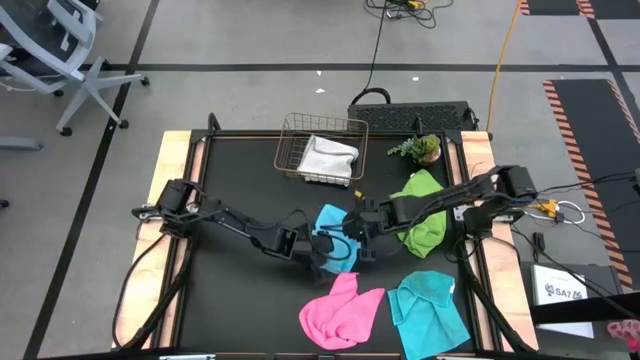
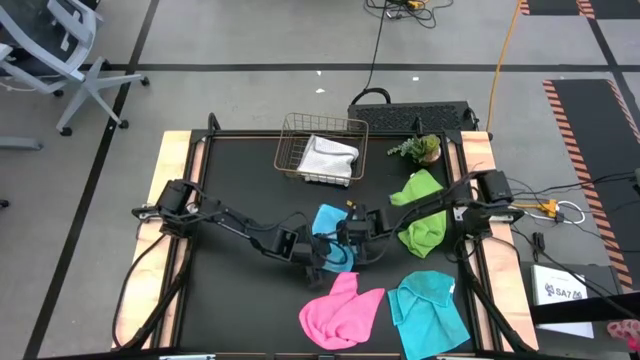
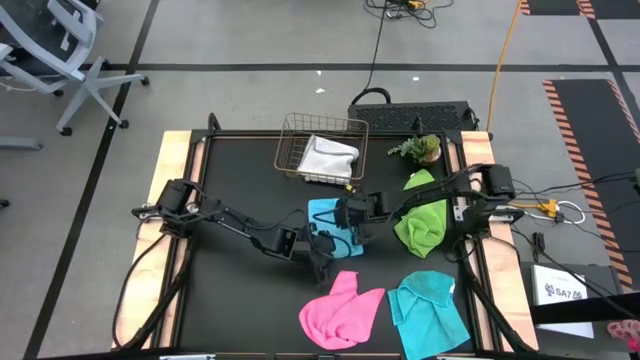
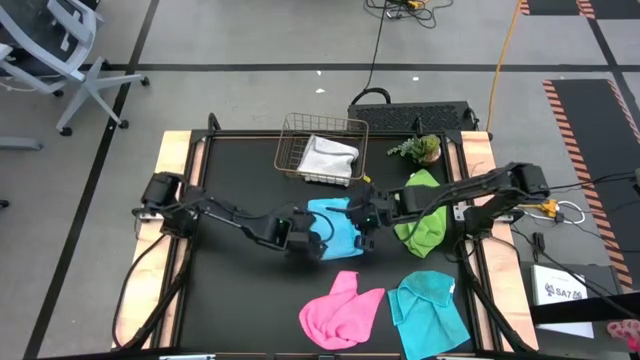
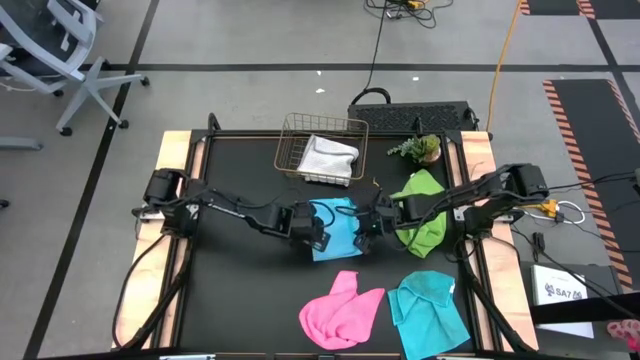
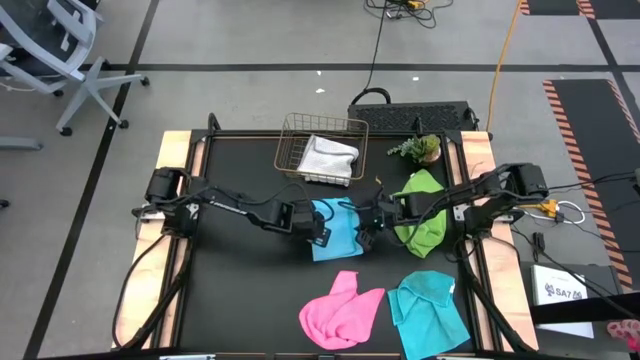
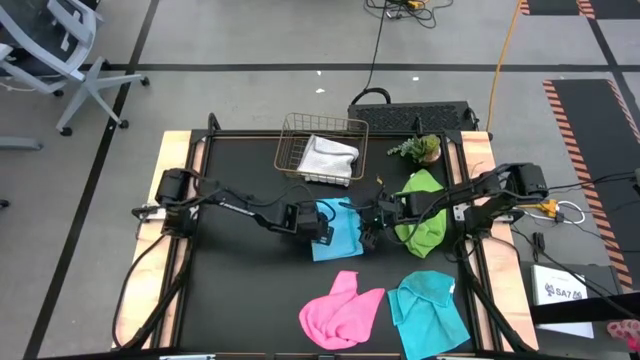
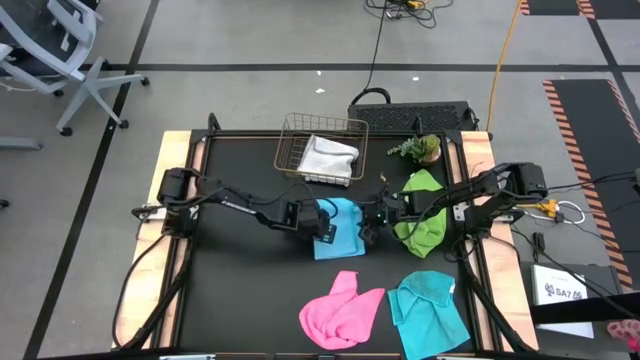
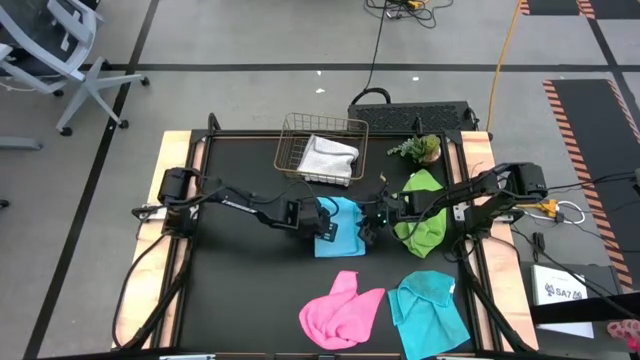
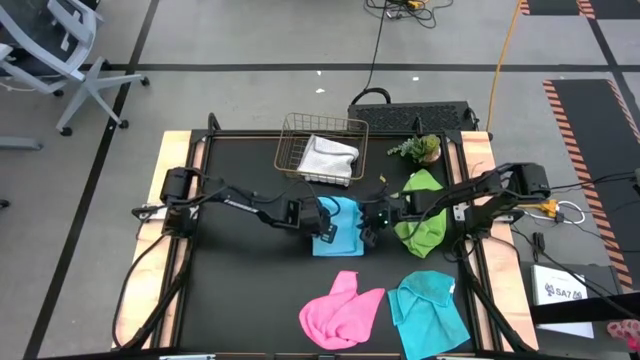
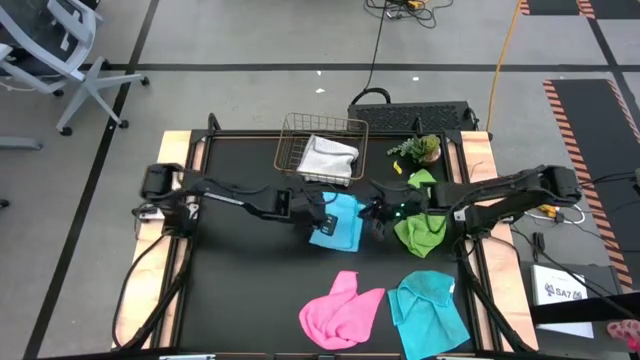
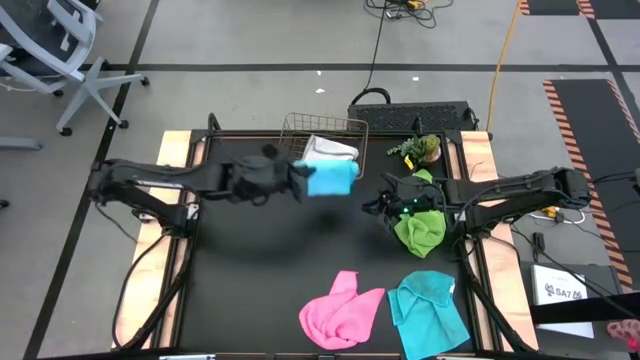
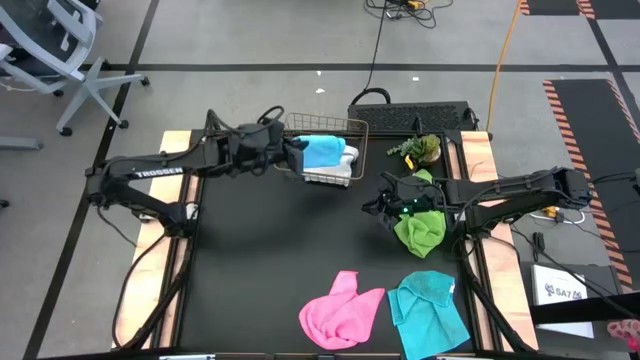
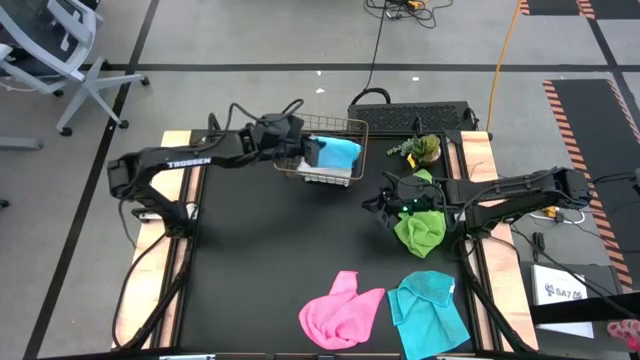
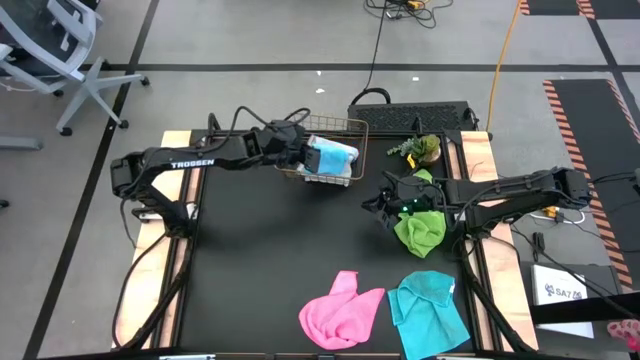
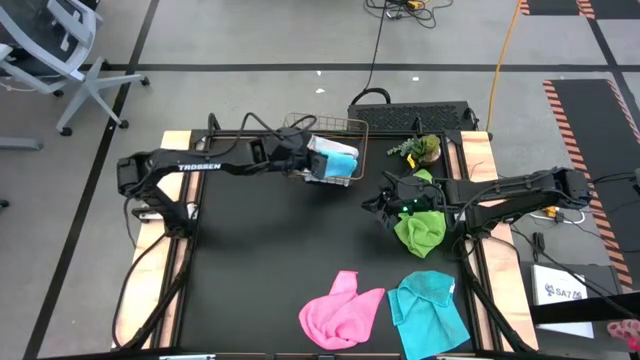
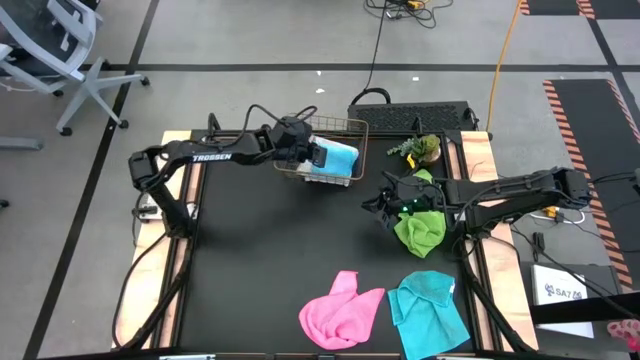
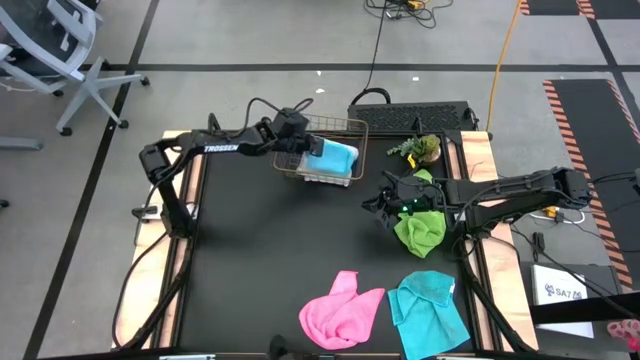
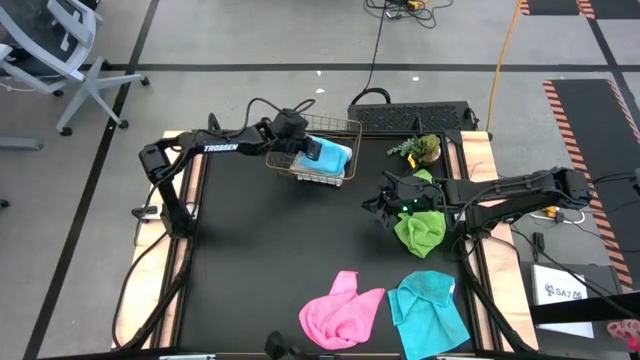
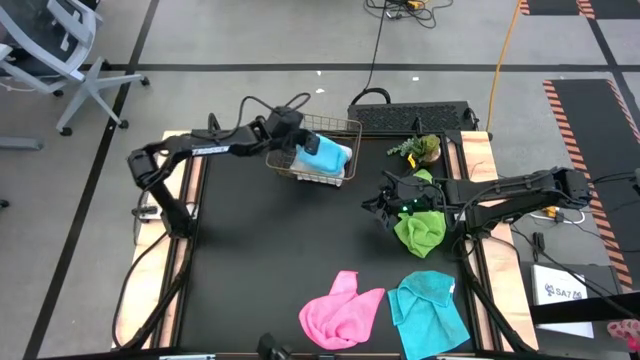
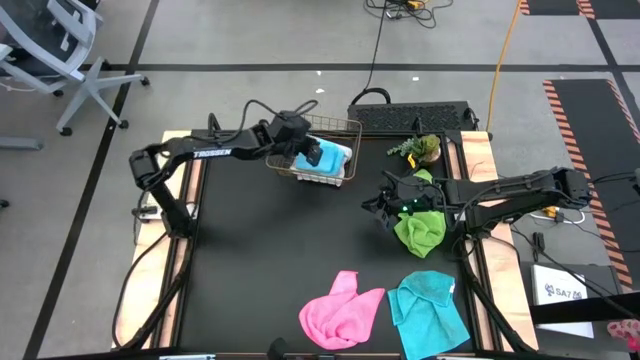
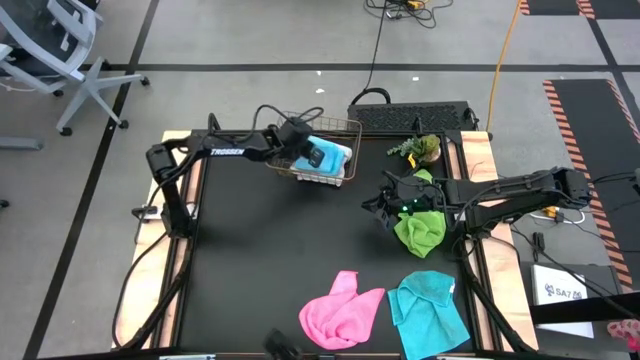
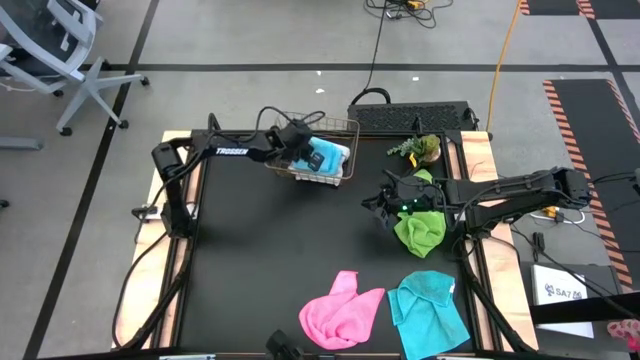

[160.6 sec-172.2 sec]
Task: Fold microfiber towels
Put the top blue microfiber cloth into the wire basket

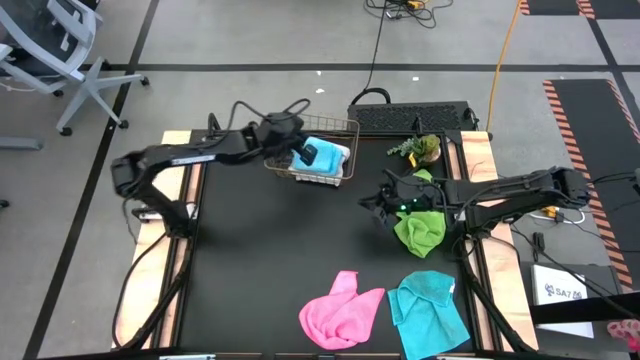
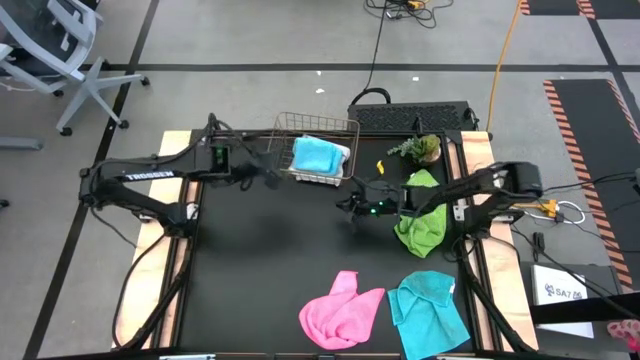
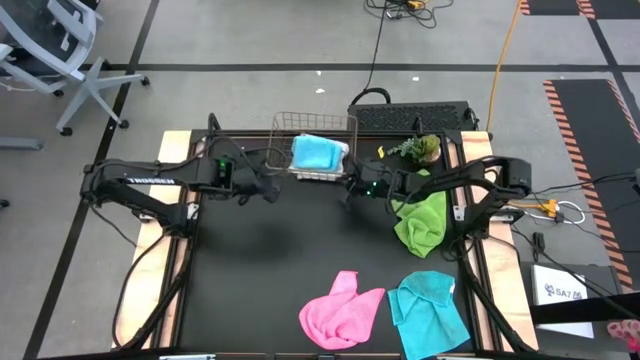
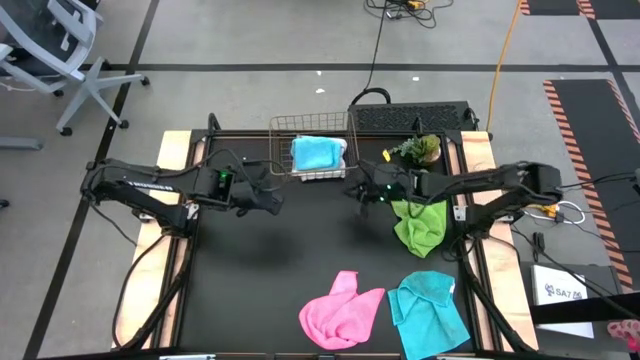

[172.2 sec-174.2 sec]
Adjust the wire basket

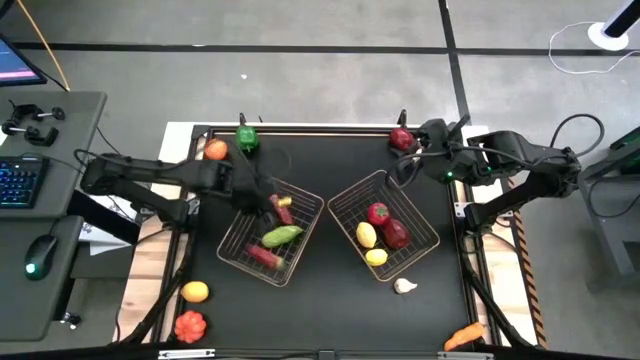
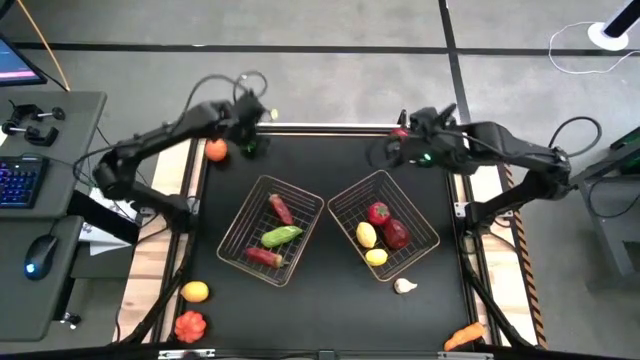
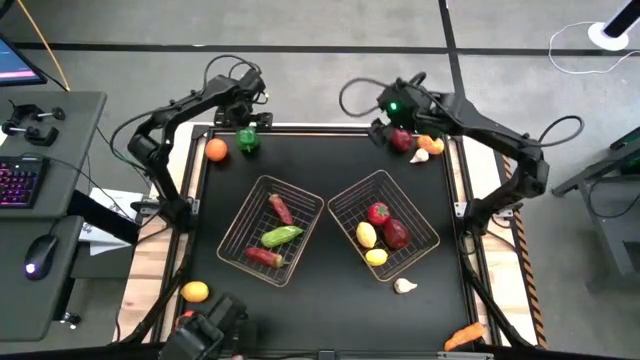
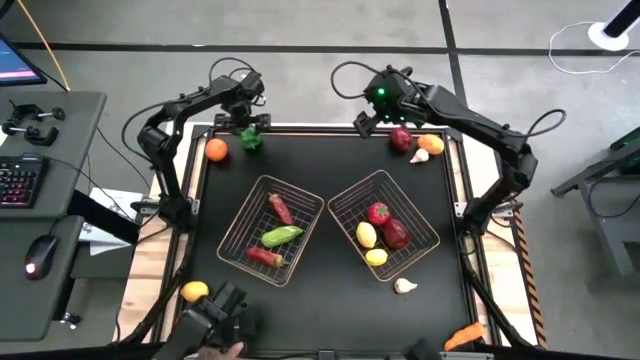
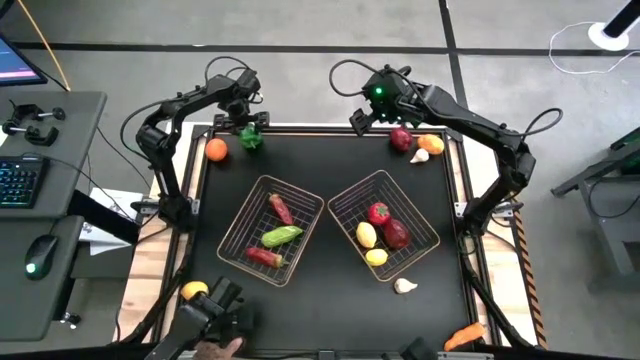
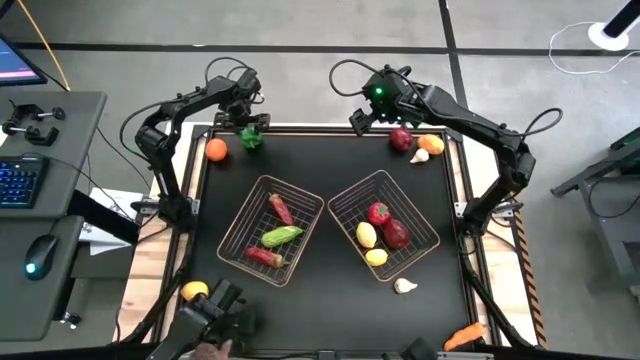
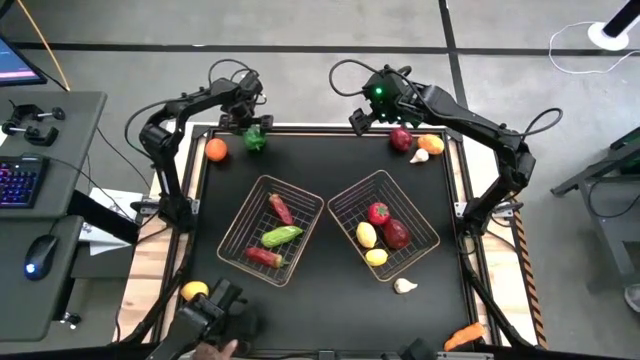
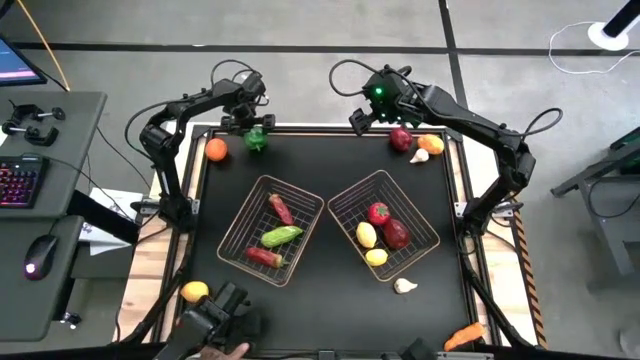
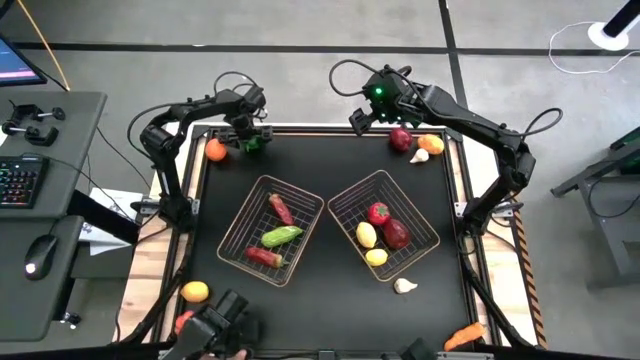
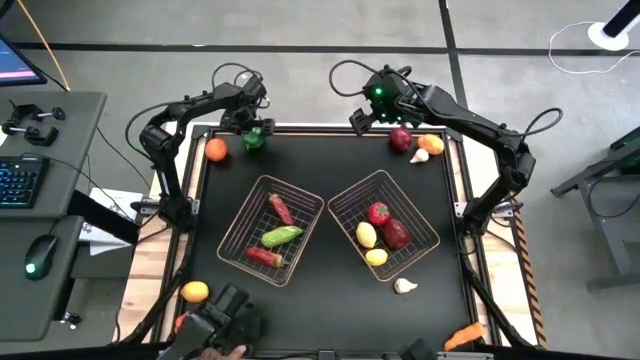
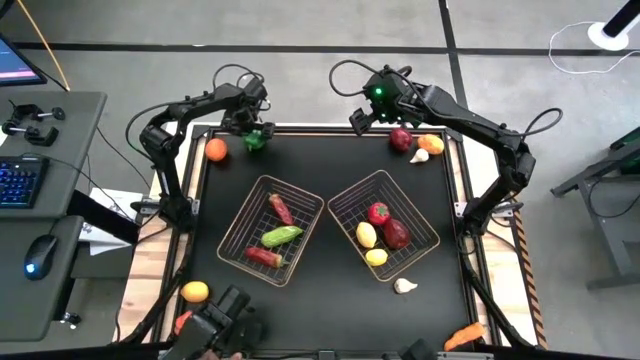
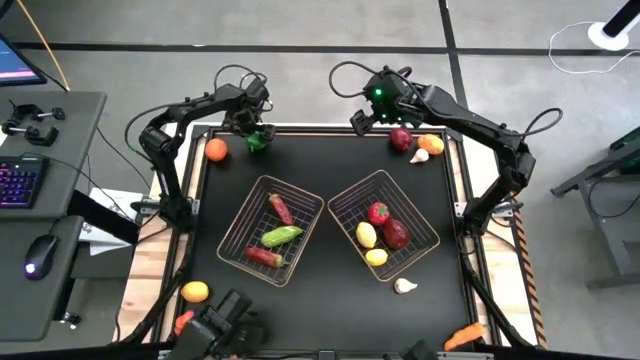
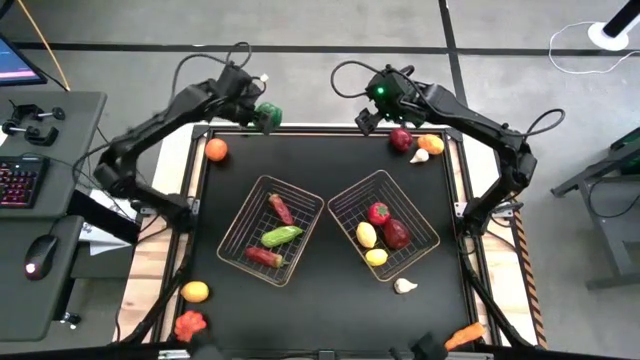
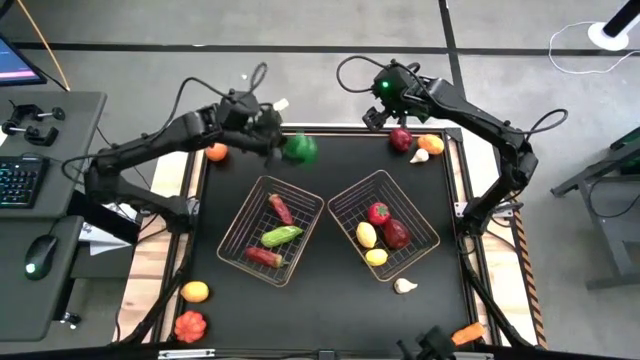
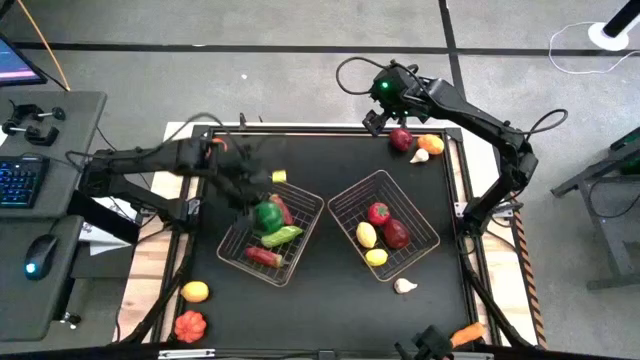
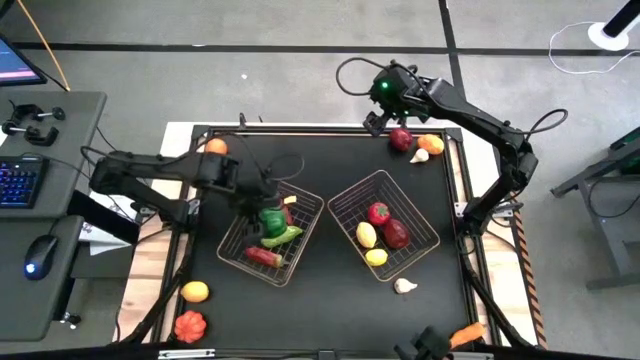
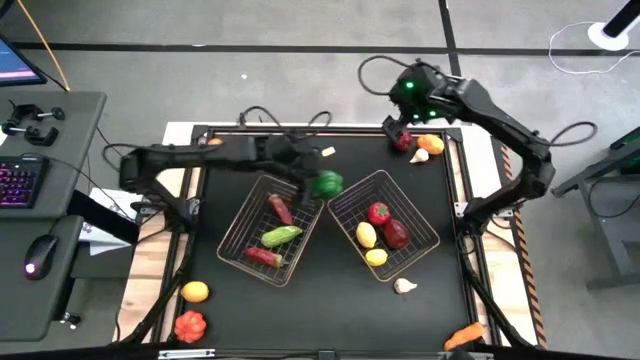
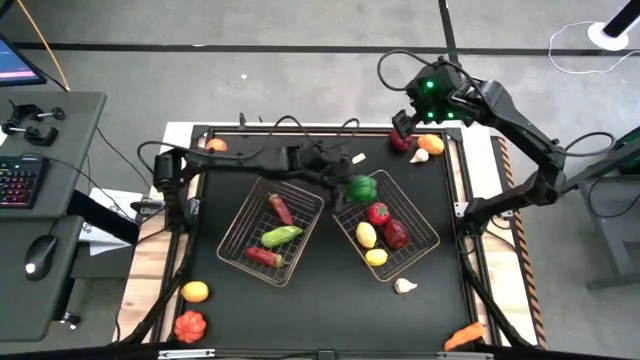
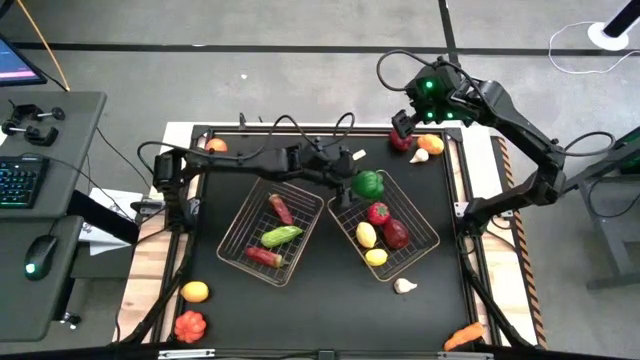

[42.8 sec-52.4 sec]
Task: Sort produce into baskets
Put the green bell pepper into the left basket
